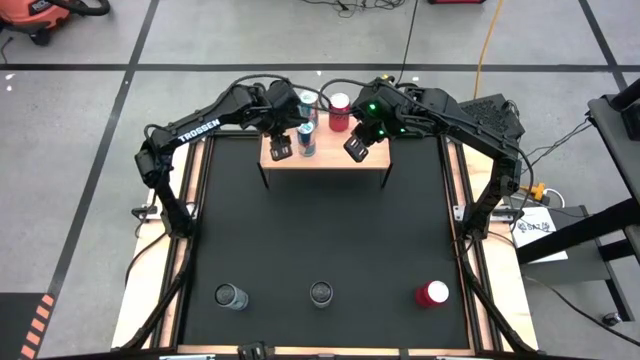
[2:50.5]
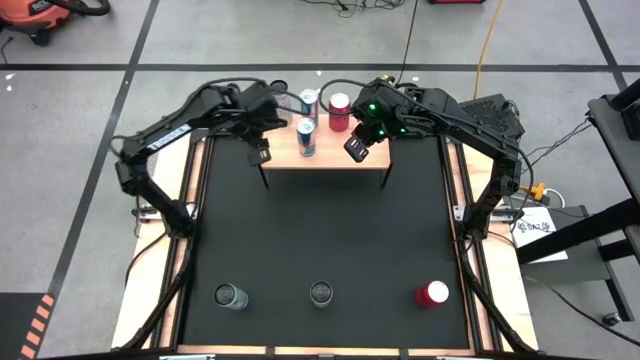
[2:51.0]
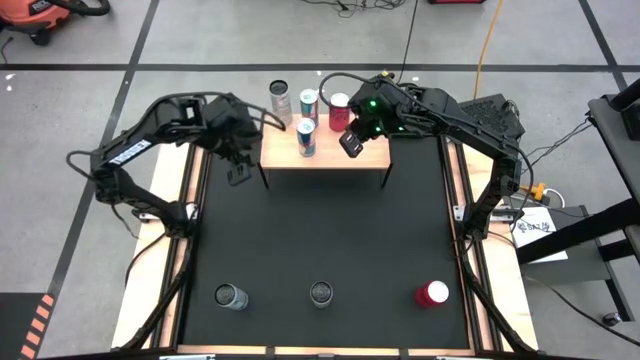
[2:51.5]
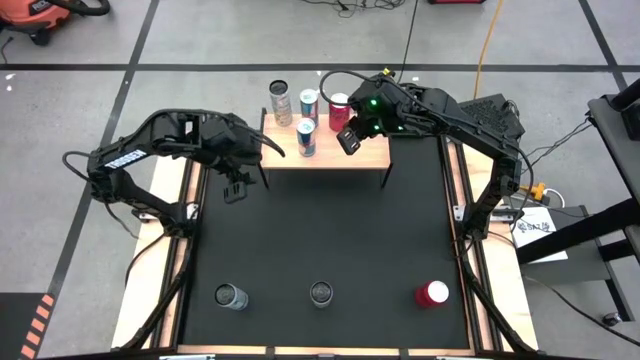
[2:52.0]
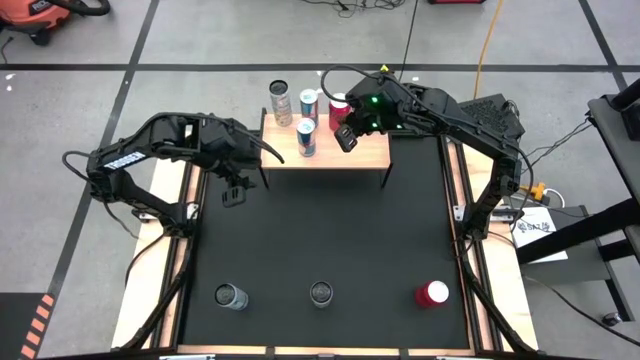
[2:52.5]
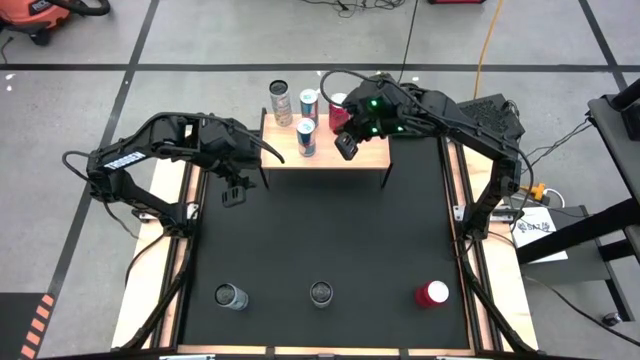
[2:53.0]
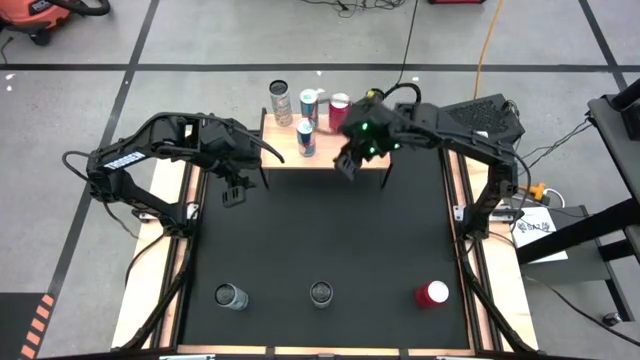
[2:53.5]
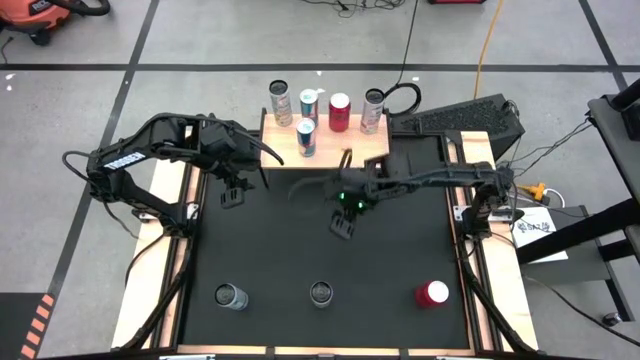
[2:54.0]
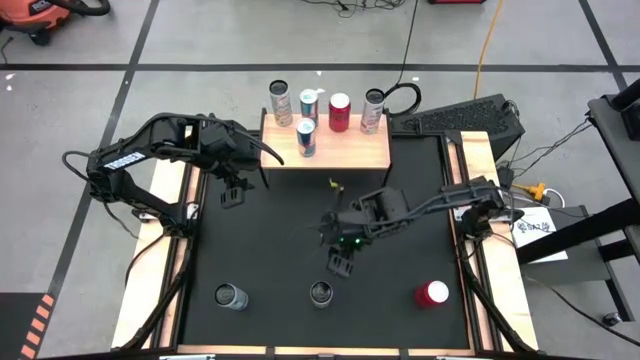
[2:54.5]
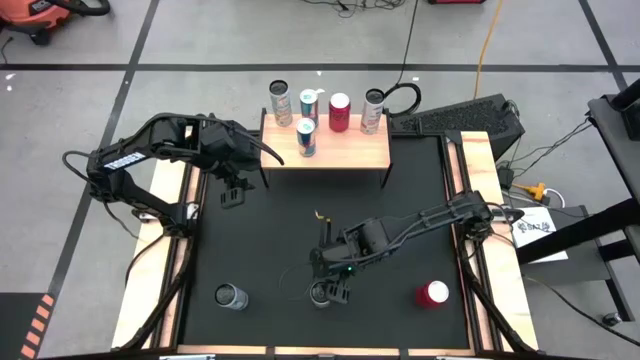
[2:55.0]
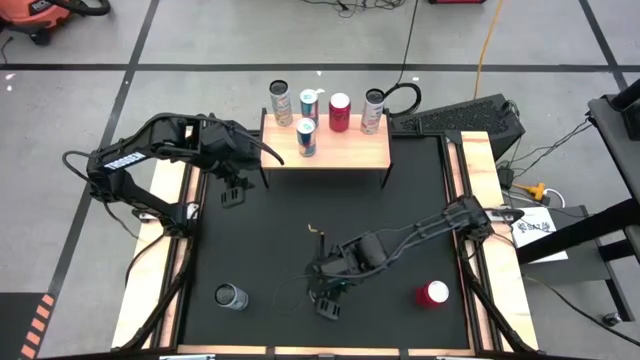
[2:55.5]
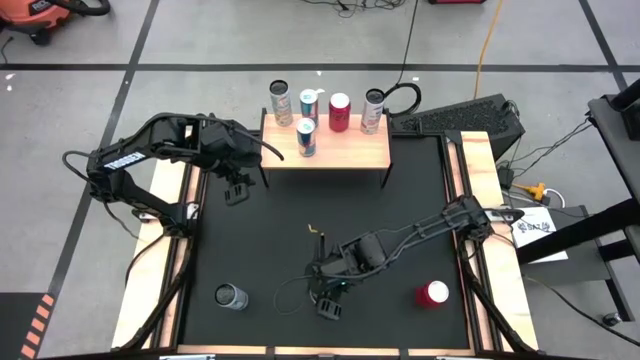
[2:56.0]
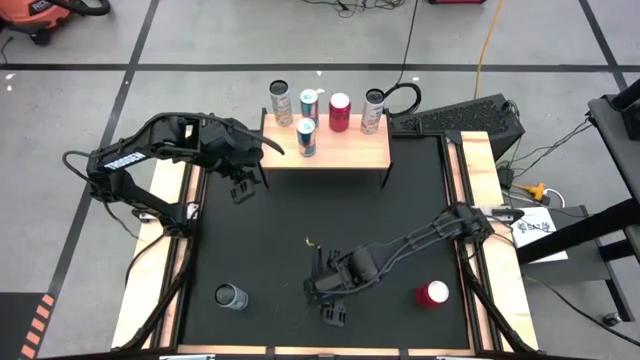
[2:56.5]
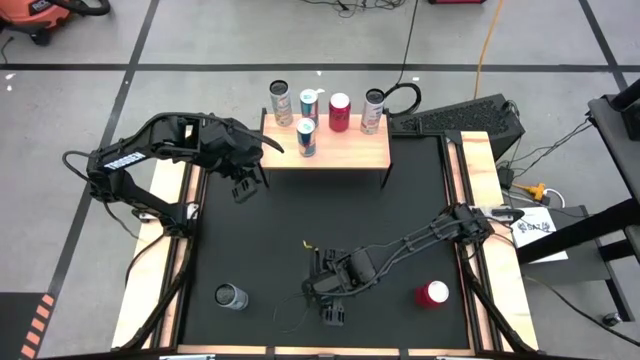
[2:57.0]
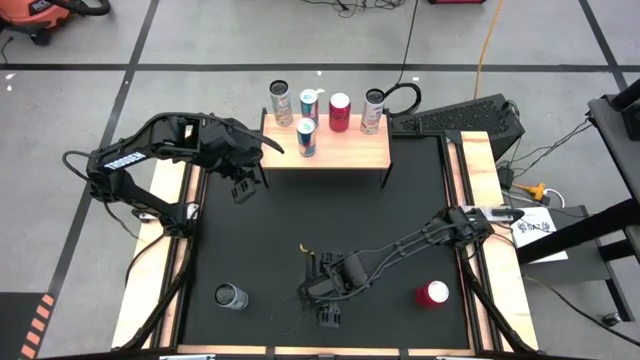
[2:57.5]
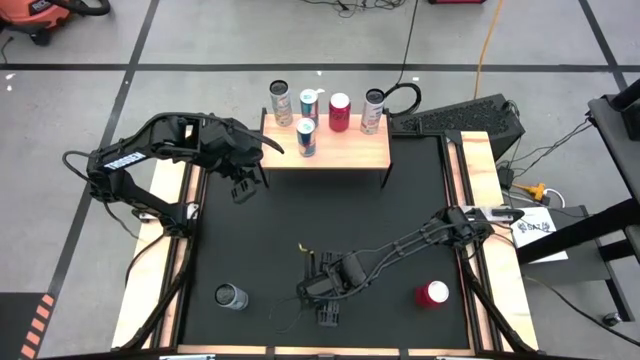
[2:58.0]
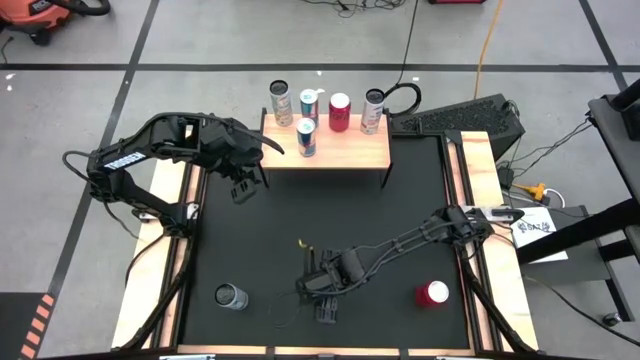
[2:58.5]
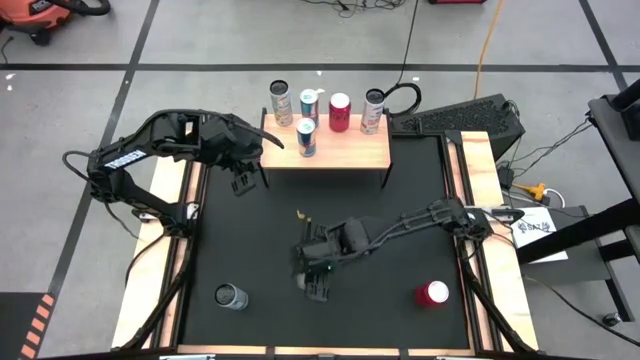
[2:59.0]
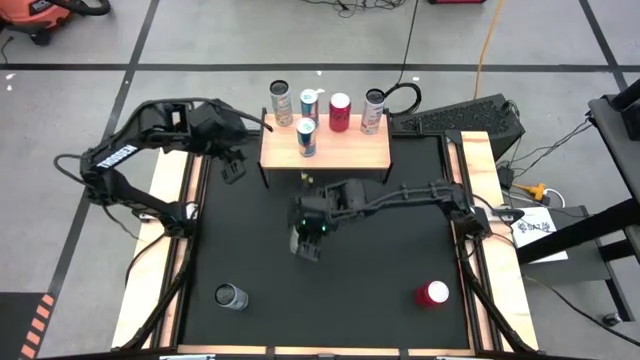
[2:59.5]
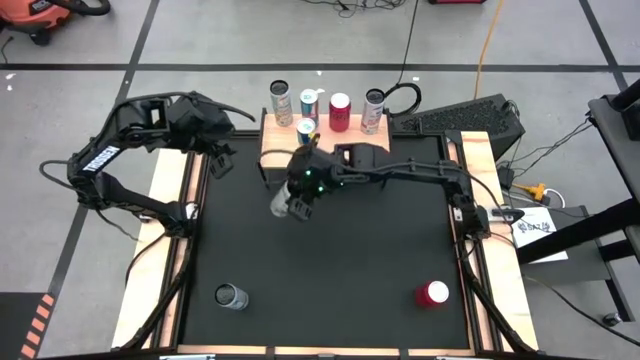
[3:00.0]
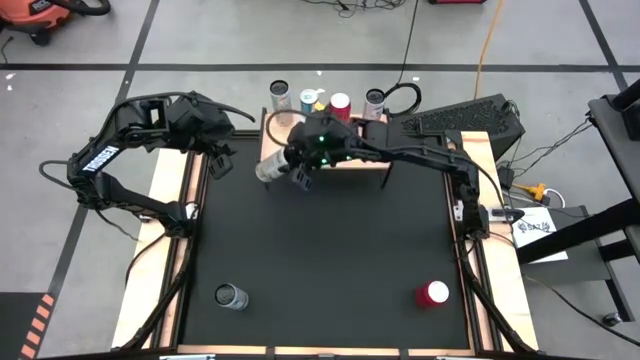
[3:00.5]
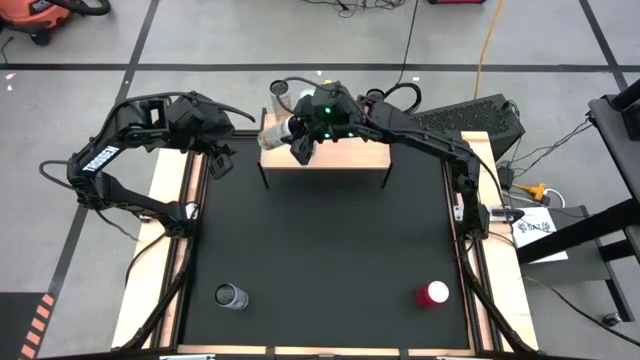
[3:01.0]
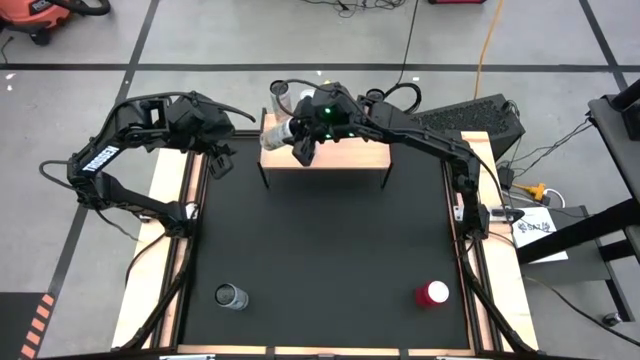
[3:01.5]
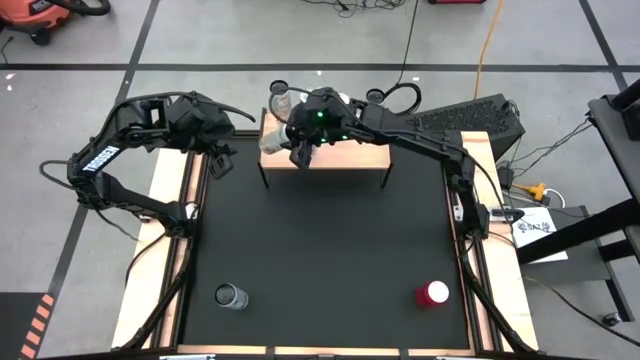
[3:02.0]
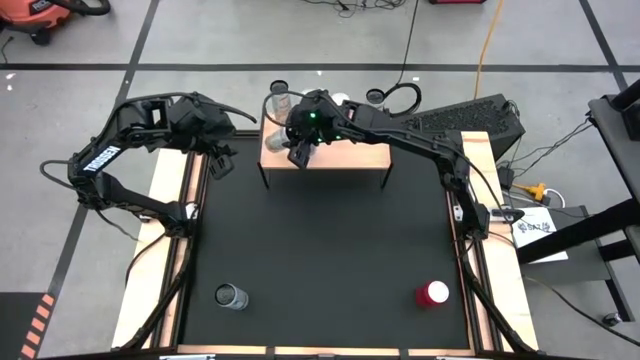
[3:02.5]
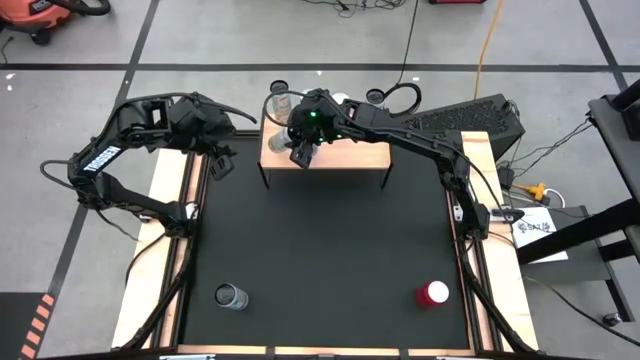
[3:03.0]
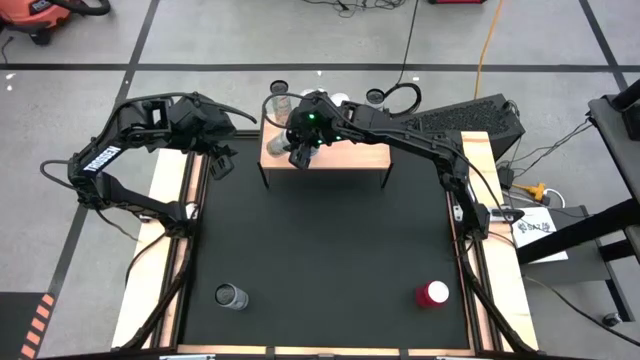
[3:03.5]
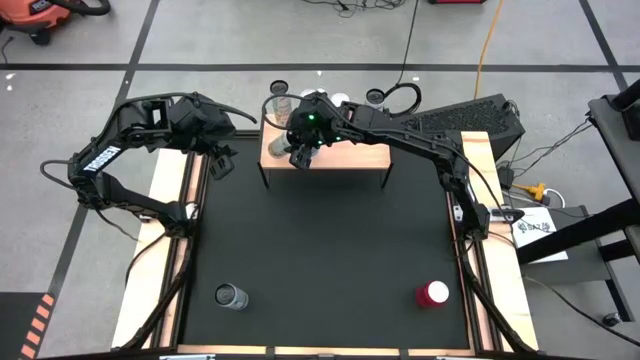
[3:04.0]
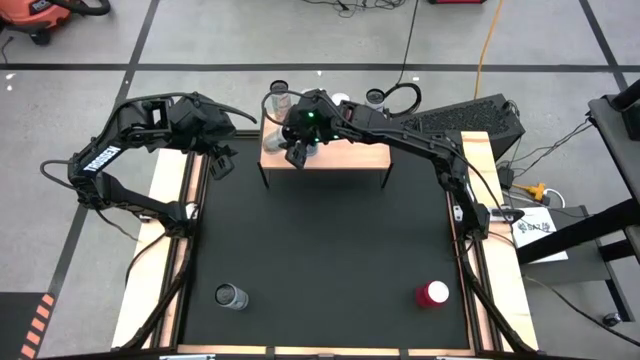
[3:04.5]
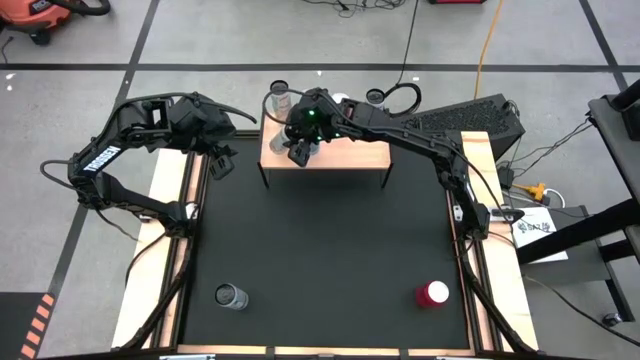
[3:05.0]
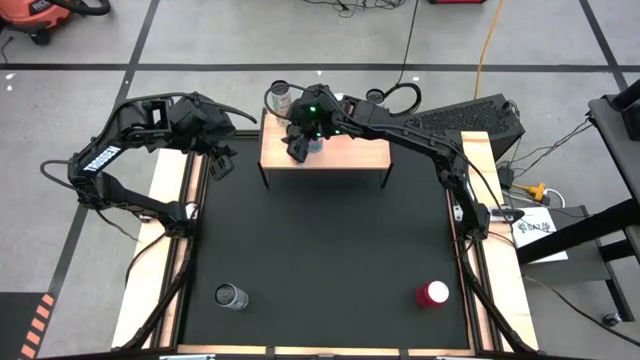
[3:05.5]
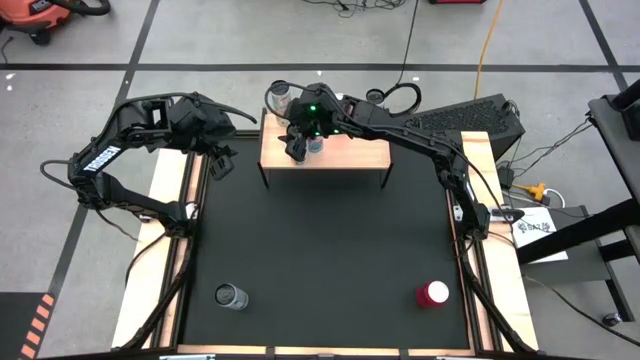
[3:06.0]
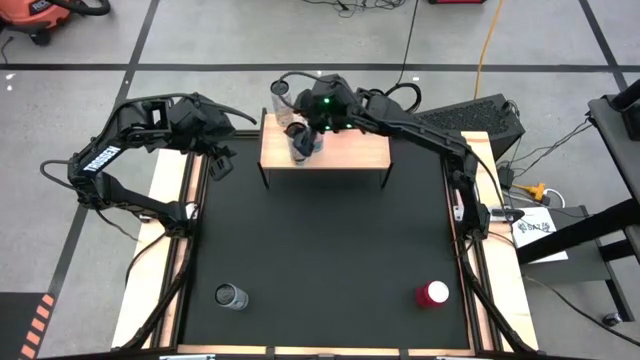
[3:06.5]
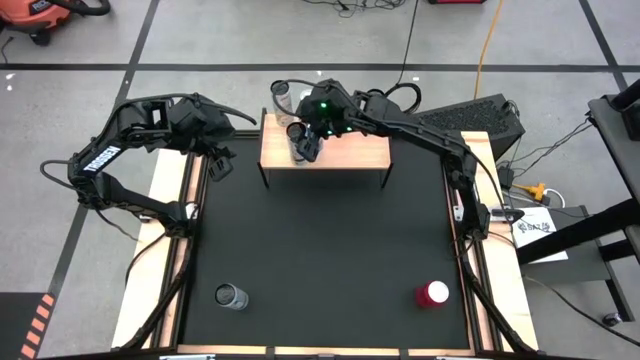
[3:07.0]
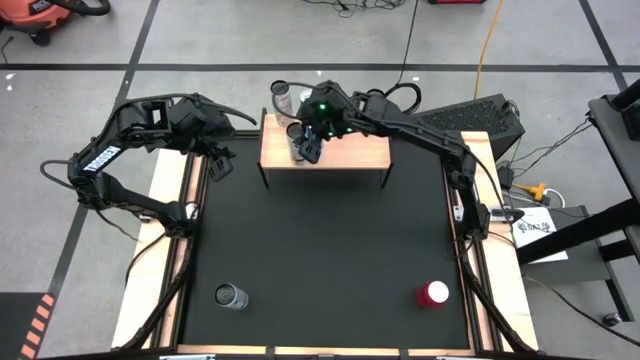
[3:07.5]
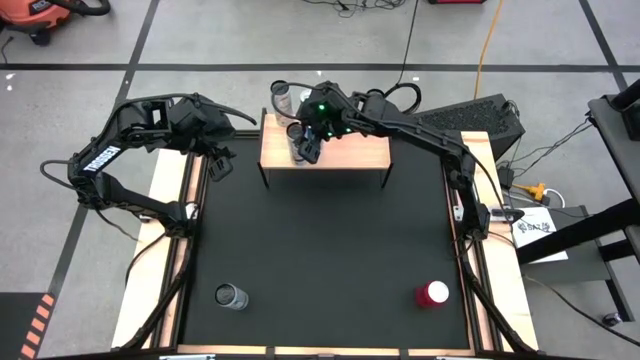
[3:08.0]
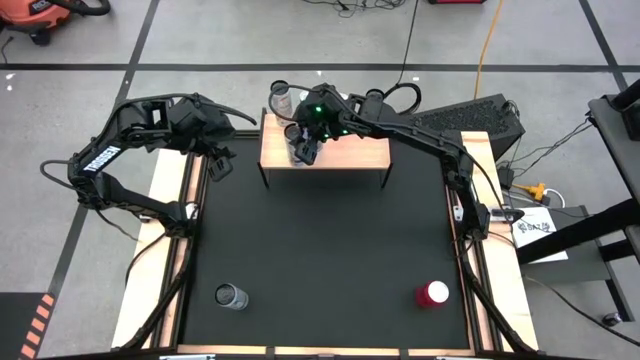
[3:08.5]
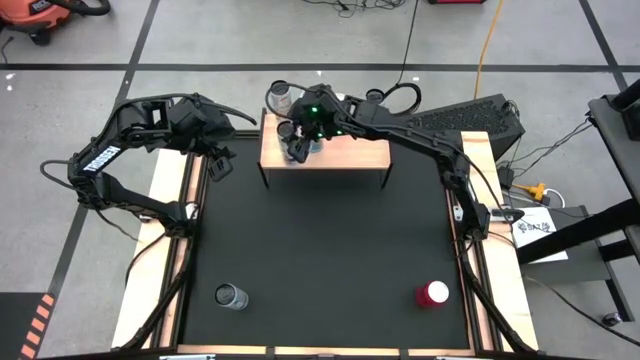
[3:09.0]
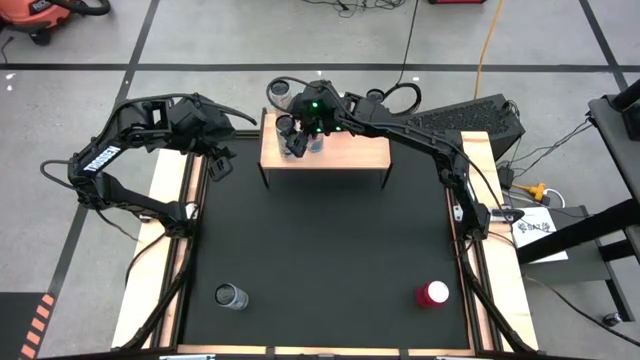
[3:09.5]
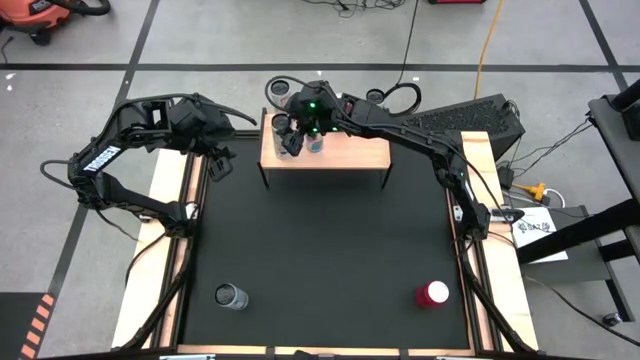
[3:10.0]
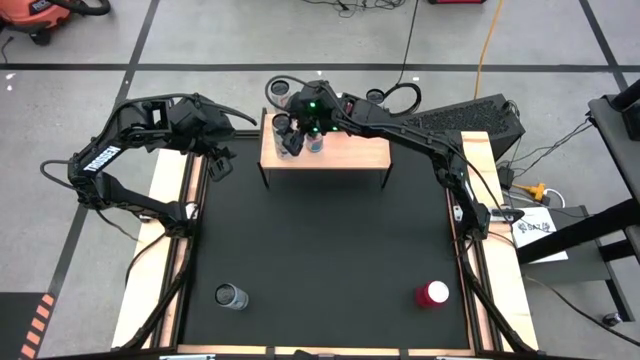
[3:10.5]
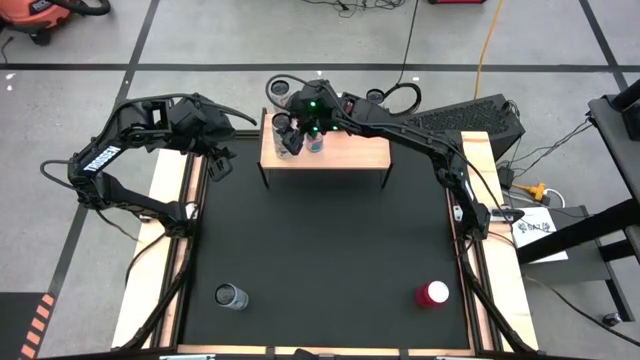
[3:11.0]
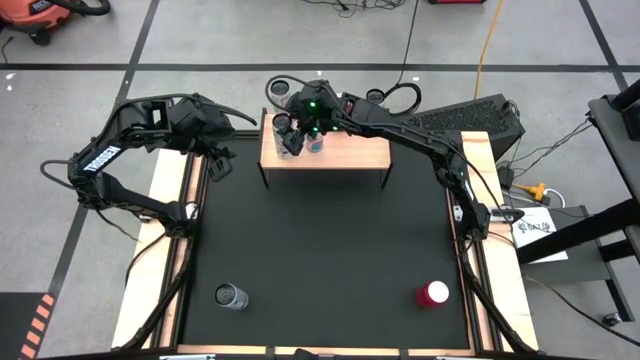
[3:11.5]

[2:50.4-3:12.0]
Task: Place canned beverage on shelf
Put the white-yellow soda can on the shelf
